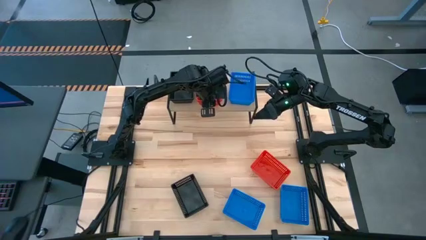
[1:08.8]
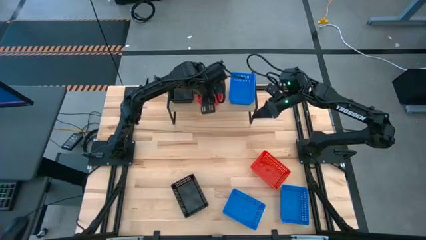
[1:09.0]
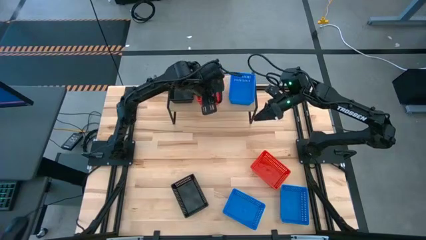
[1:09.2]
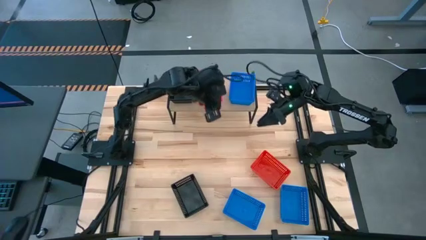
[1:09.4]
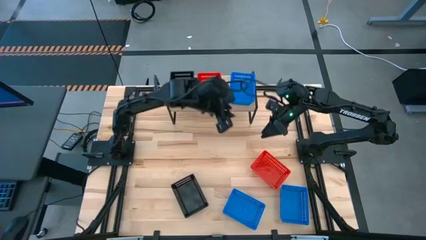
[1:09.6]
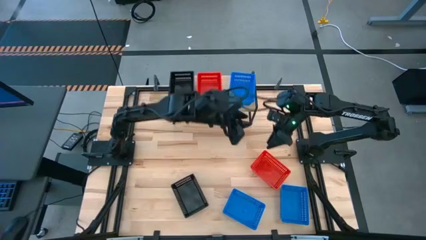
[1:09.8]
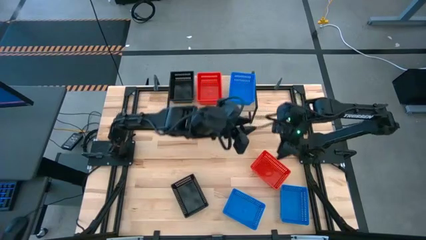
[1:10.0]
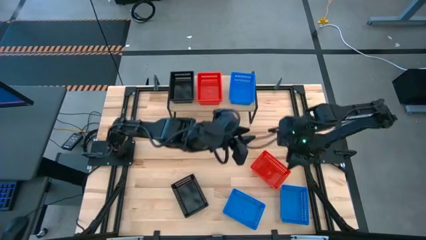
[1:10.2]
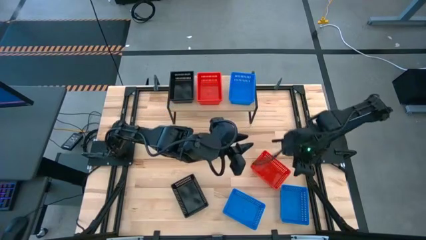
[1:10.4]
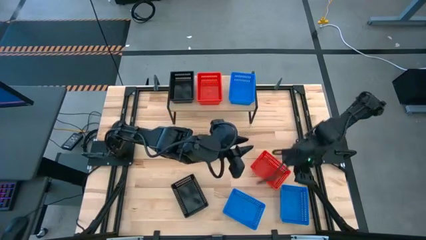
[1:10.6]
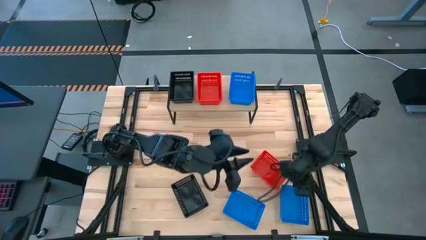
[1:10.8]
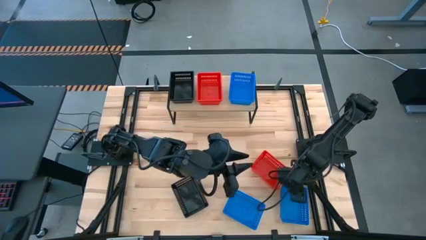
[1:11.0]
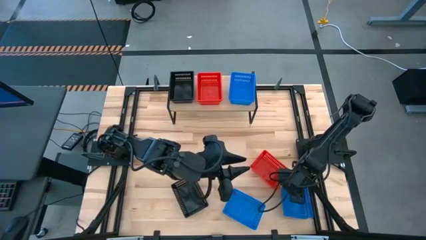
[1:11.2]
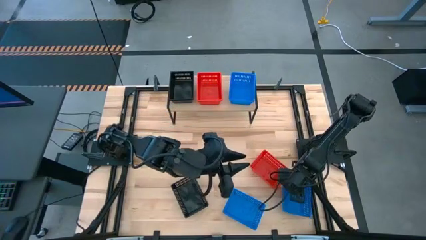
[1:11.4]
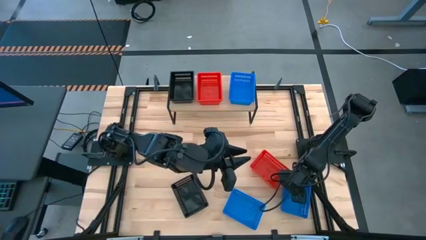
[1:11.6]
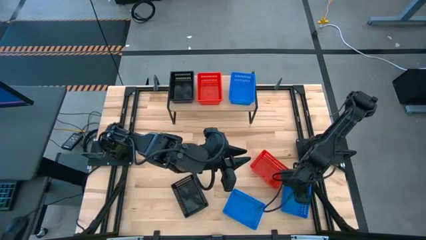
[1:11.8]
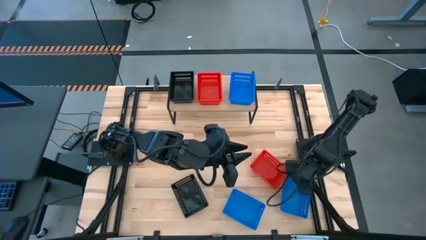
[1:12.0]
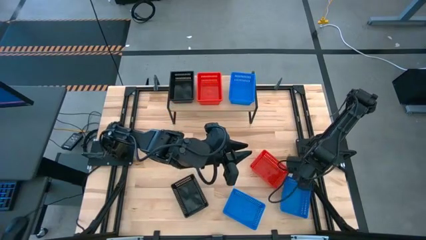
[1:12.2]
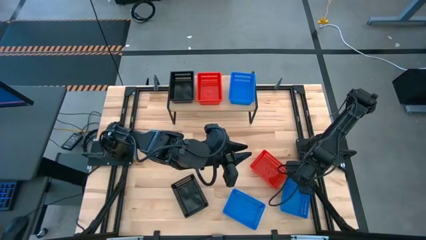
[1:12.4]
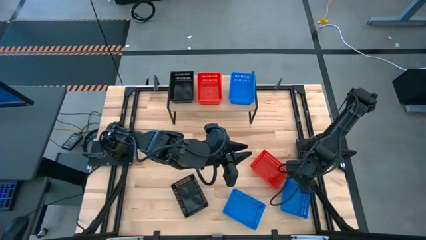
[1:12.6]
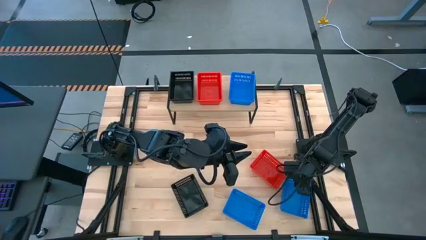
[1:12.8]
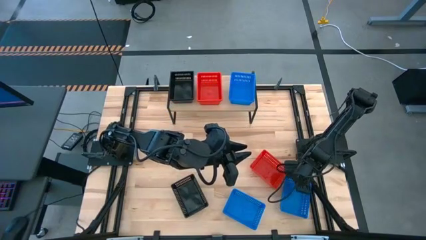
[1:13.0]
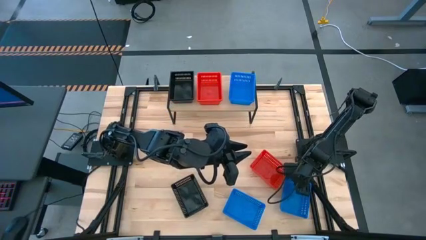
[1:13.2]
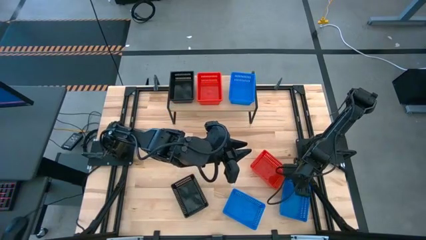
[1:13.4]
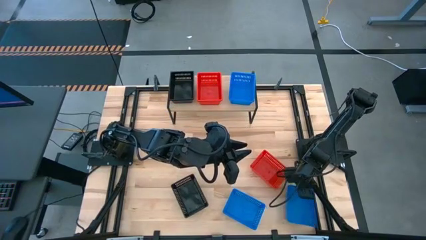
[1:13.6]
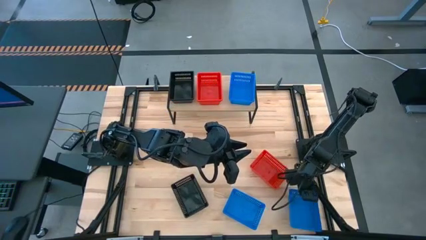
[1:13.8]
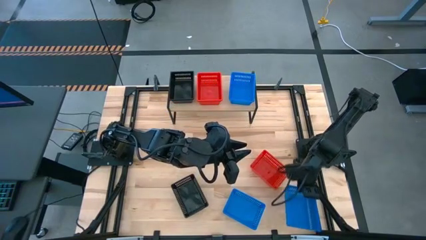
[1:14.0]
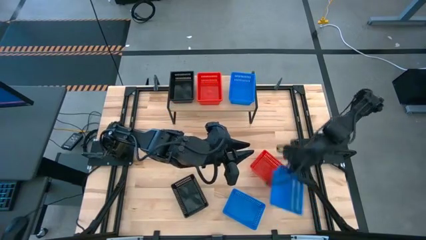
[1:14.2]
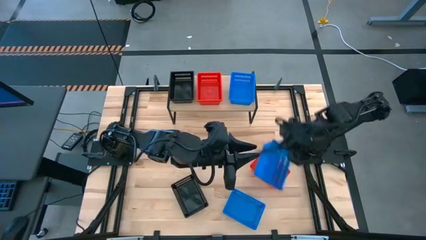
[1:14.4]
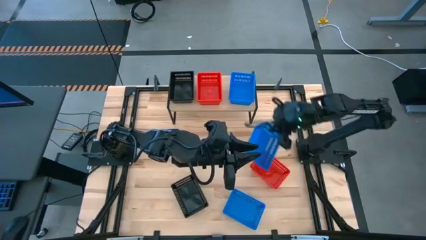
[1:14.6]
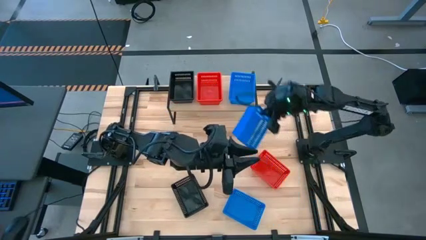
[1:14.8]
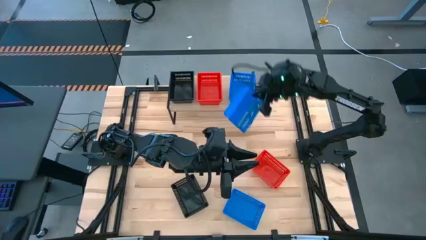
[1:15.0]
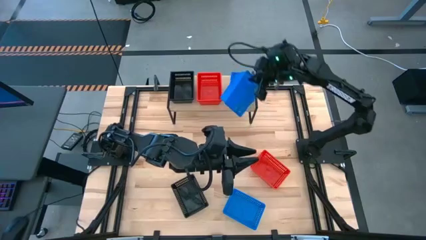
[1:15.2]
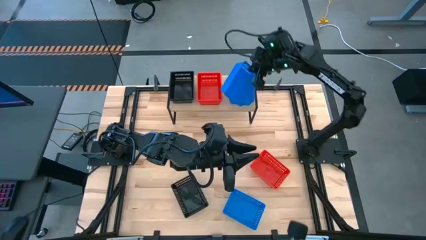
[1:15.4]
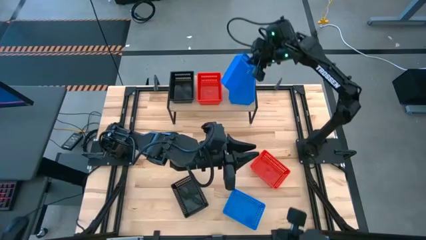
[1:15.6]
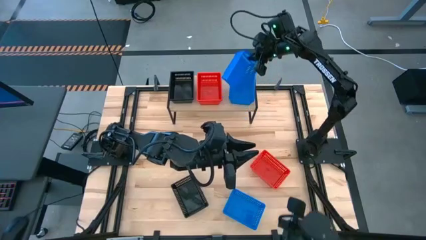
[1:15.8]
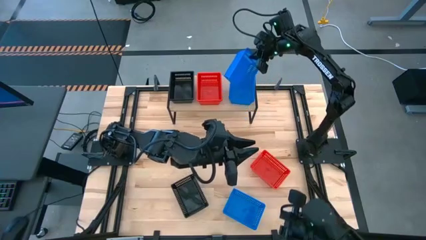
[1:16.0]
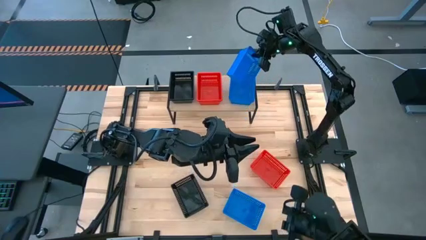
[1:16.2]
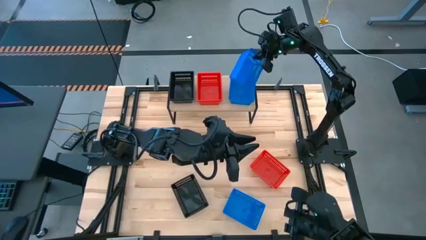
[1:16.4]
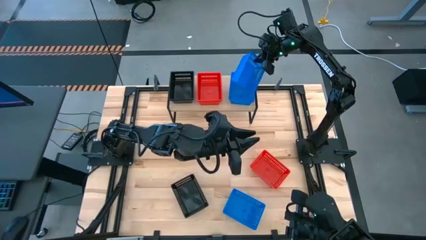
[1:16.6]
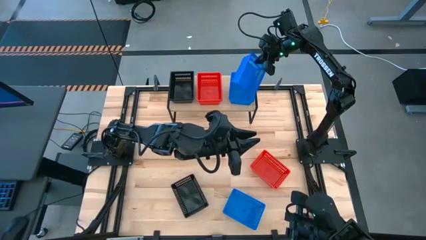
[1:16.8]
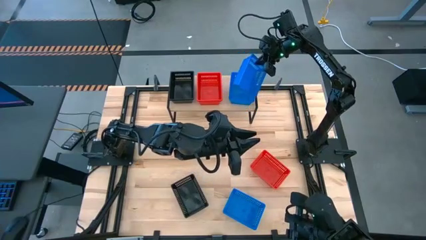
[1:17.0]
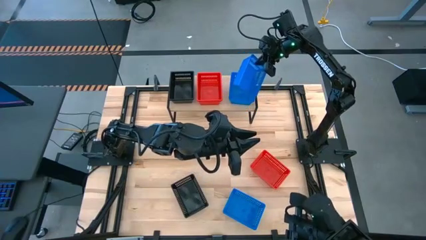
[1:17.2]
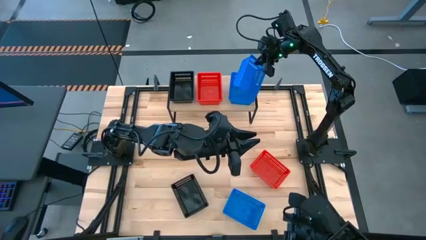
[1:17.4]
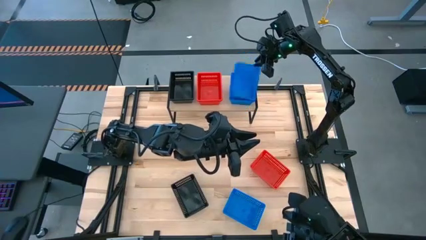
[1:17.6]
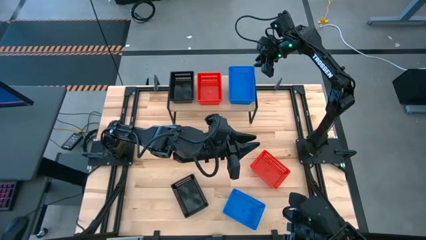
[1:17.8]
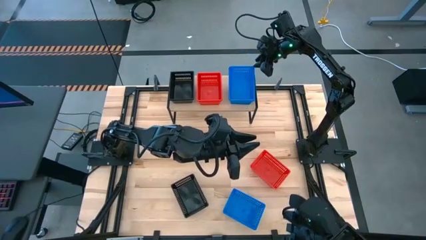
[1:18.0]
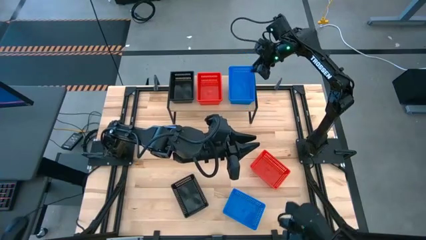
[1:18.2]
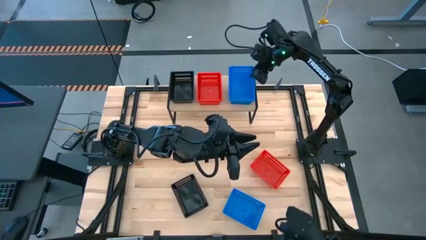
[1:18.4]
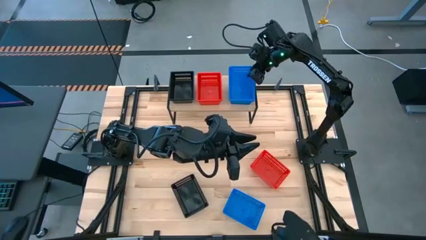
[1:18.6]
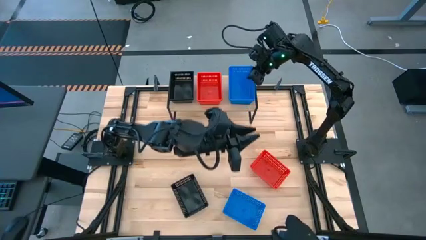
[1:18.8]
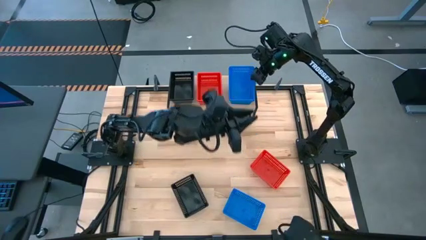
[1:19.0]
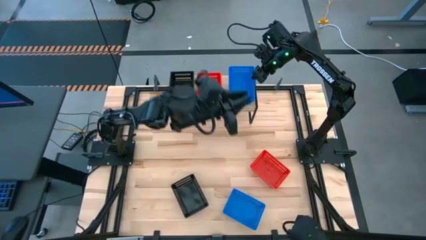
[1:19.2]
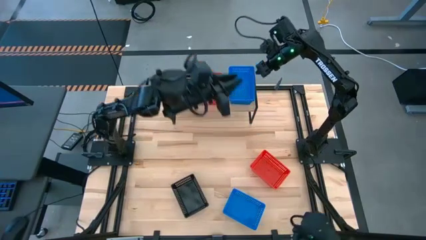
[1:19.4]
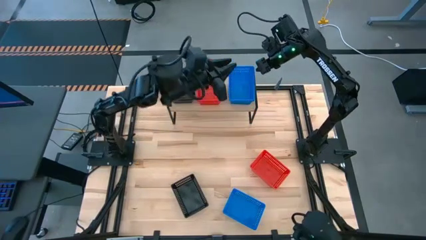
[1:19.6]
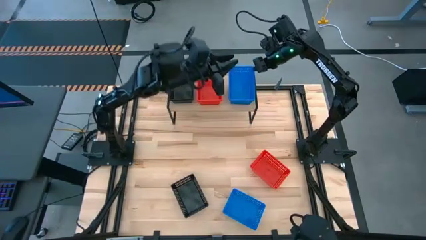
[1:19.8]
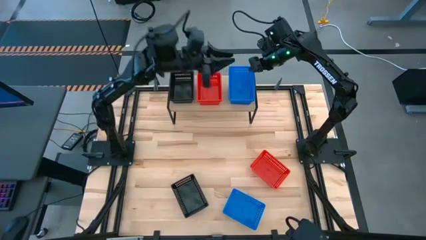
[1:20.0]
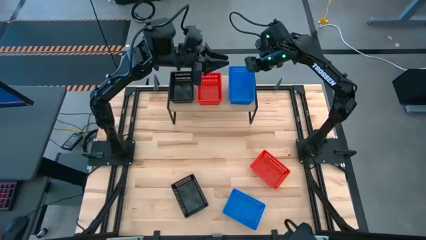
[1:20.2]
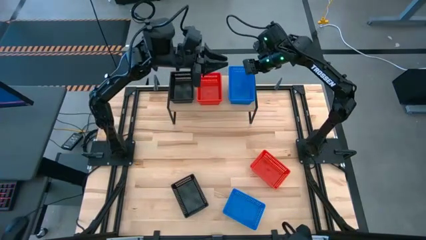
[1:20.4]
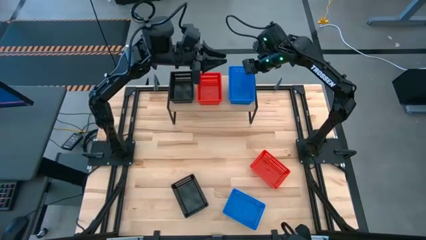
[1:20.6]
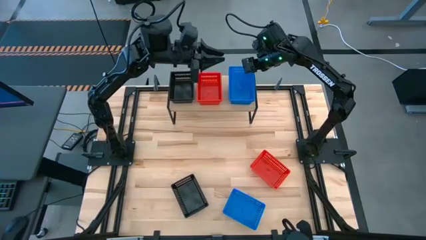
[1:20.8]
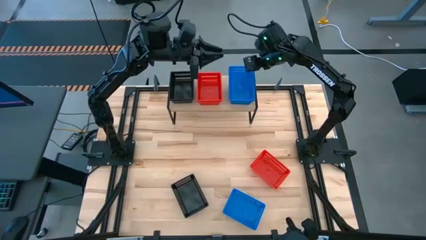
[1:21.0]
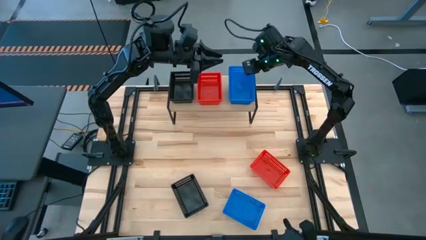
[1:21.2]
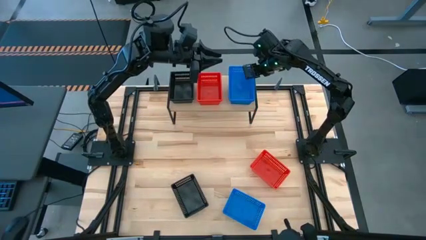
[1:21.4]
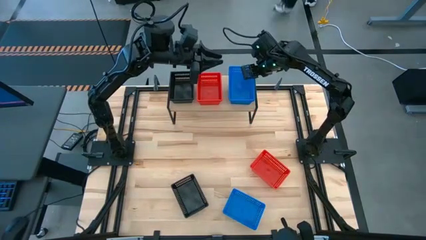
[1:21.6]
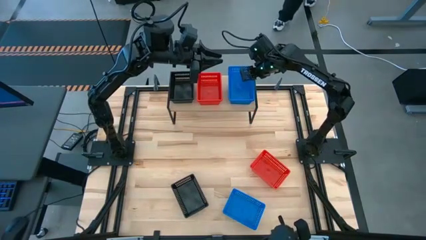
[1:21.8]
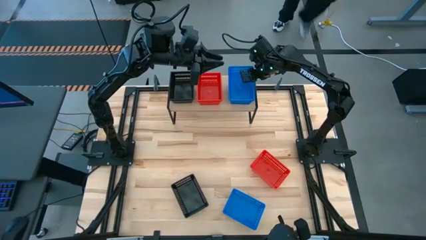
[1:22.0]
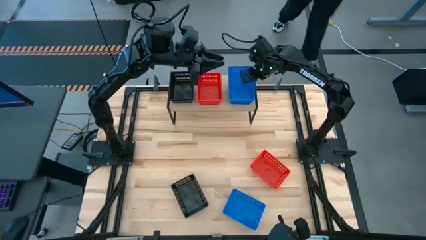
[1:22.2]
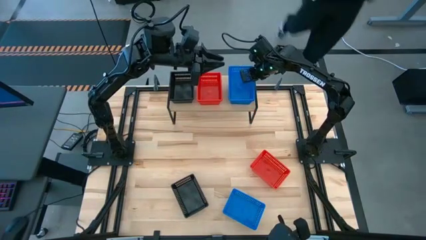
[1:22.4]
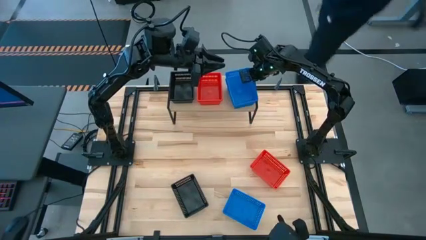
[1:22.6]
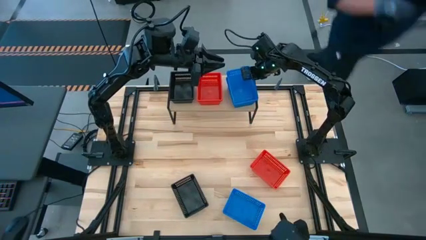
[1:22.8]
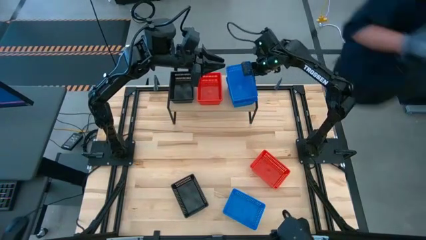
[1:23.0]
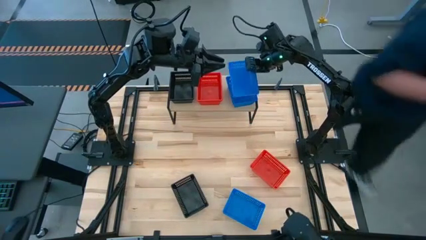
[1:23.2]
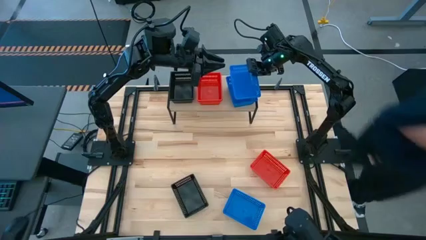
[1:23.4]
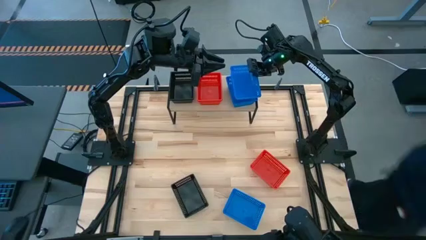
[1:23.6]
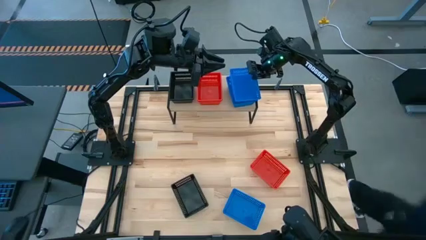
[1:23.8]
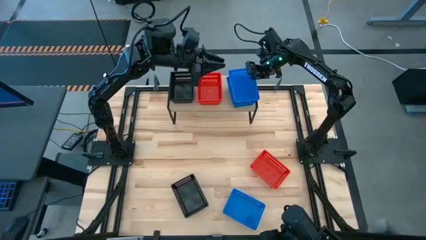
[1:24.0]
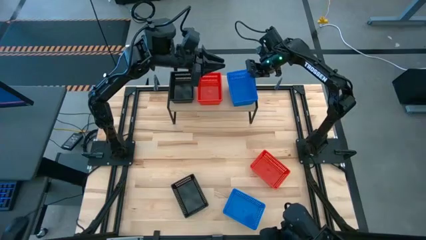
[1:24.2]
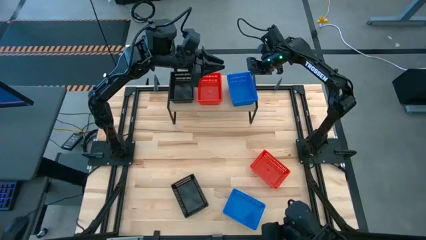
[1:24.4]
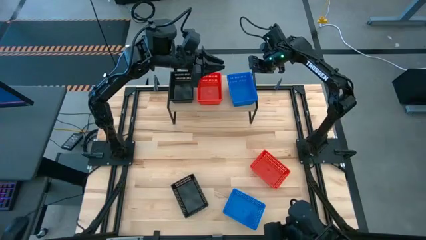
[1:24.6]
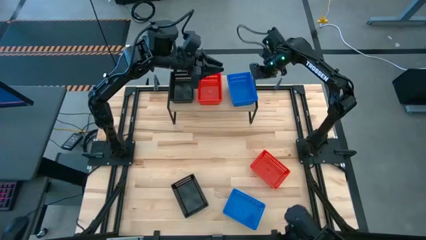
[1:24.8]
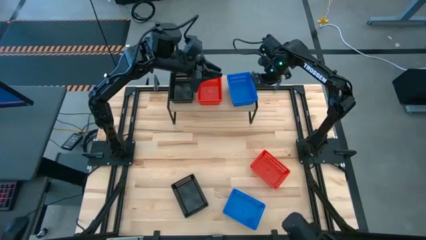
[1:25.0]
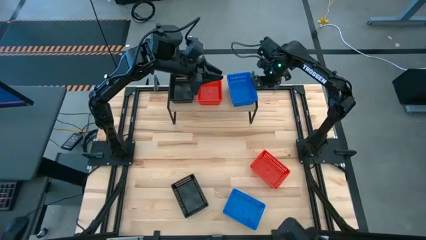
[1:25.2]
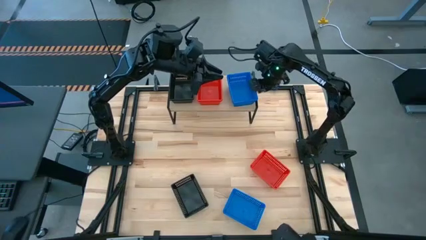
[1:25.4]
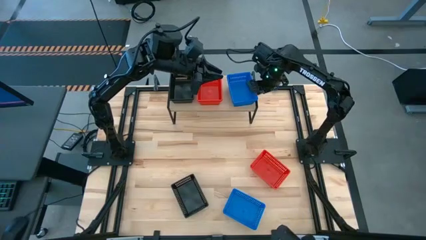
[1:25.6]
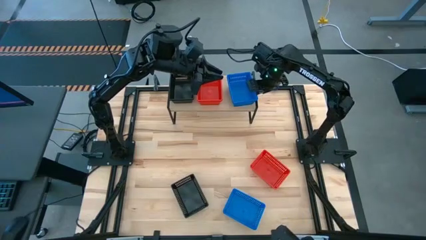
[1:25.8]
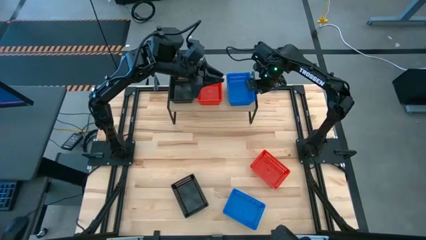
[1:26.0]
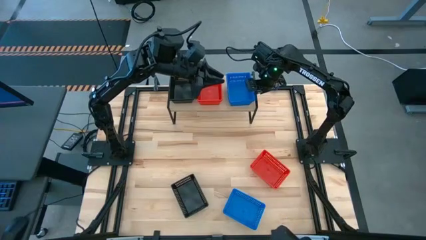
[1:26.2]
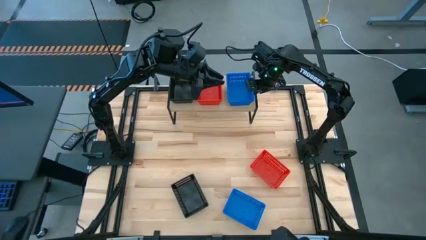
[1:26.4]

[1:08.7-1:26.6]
Task: Stack baskets on shelf by color
Stack the right blue bin on the blue bin on the shelf
